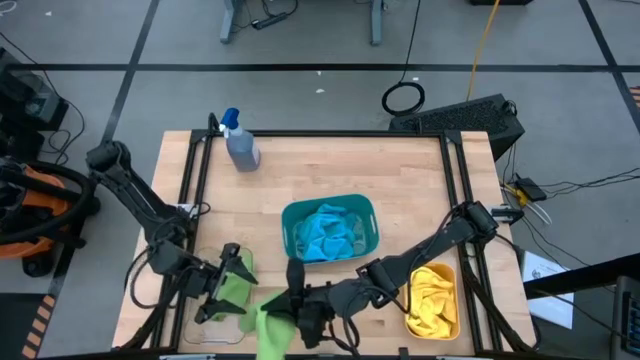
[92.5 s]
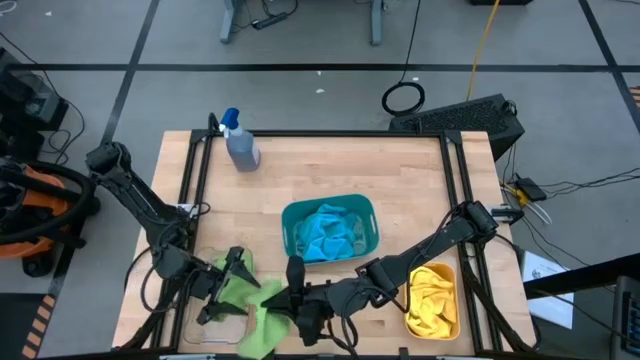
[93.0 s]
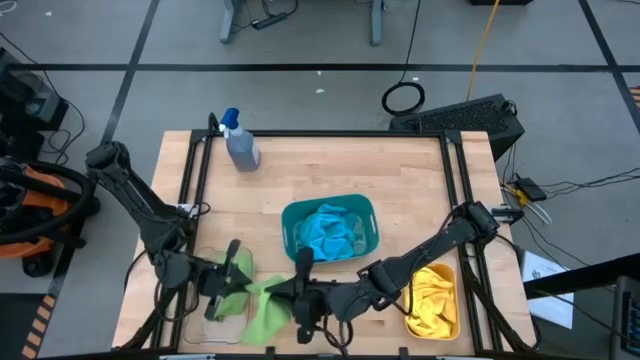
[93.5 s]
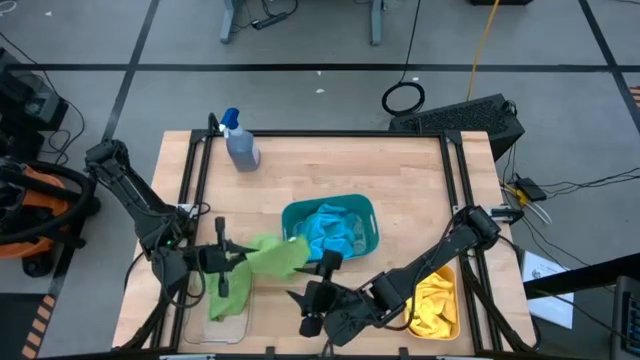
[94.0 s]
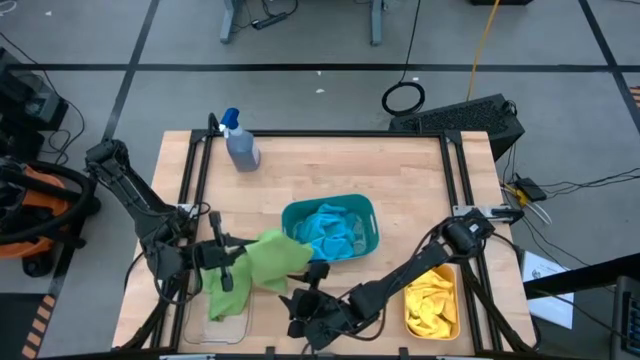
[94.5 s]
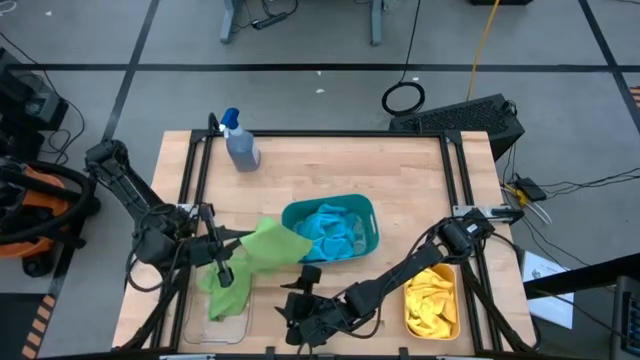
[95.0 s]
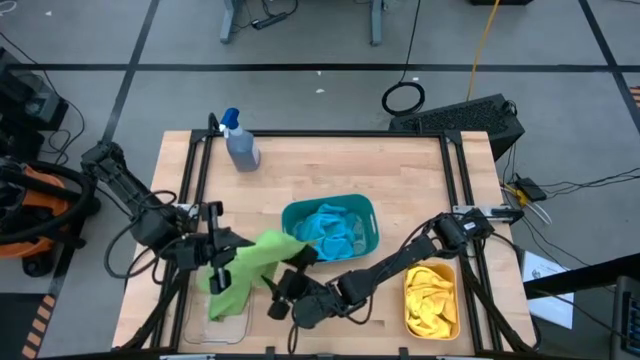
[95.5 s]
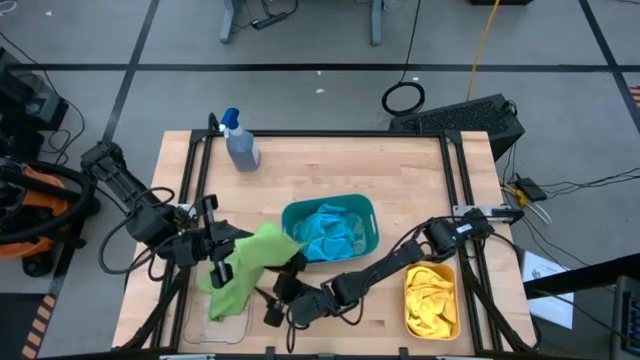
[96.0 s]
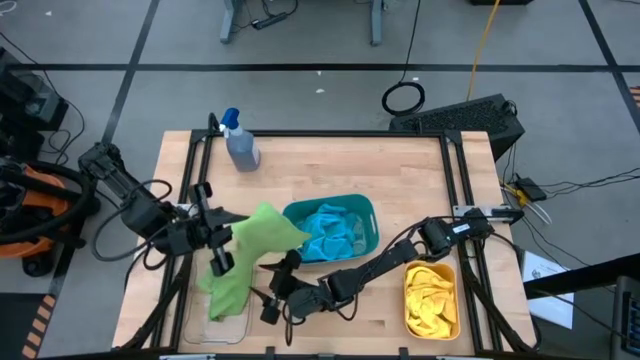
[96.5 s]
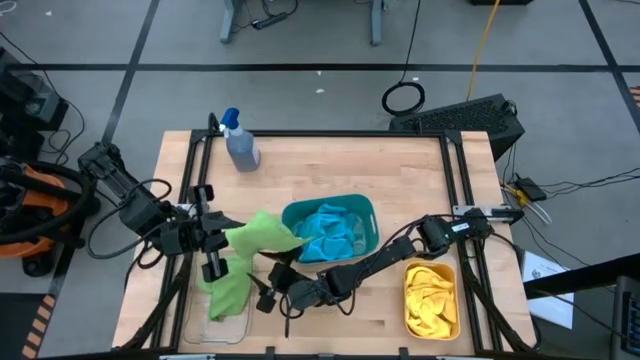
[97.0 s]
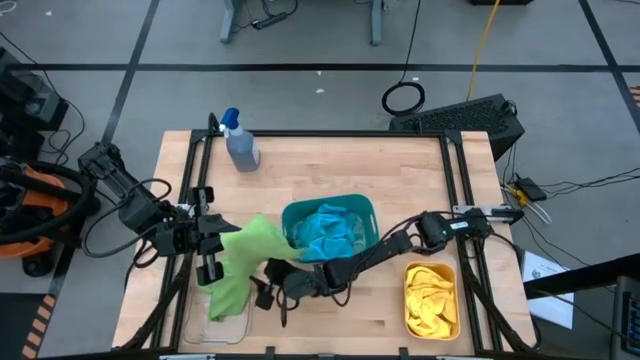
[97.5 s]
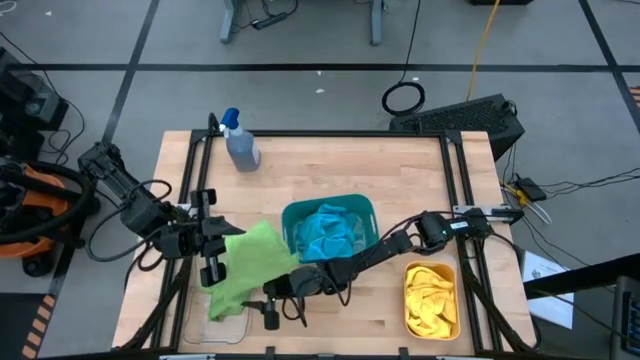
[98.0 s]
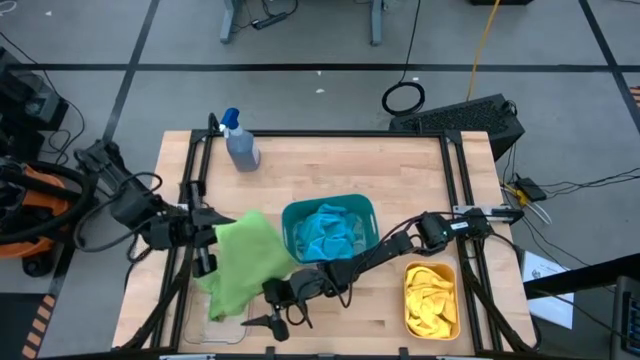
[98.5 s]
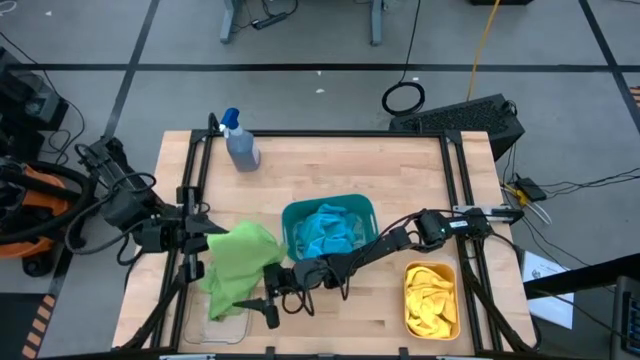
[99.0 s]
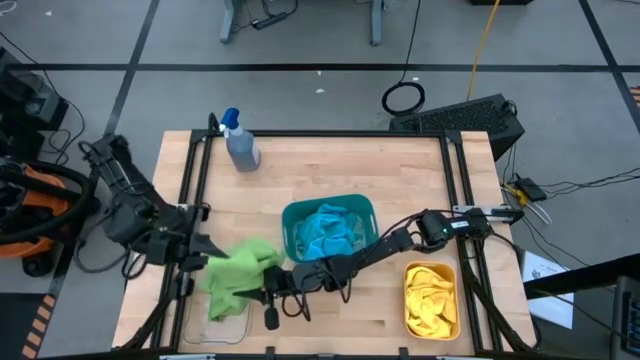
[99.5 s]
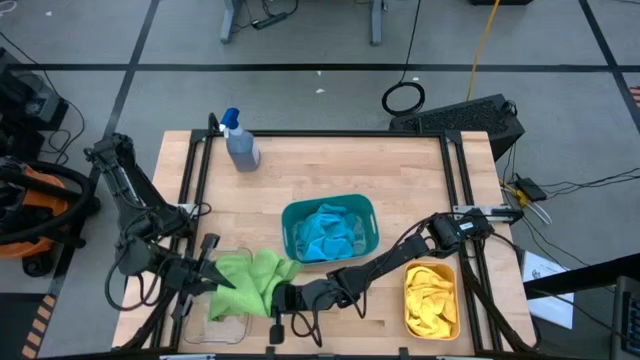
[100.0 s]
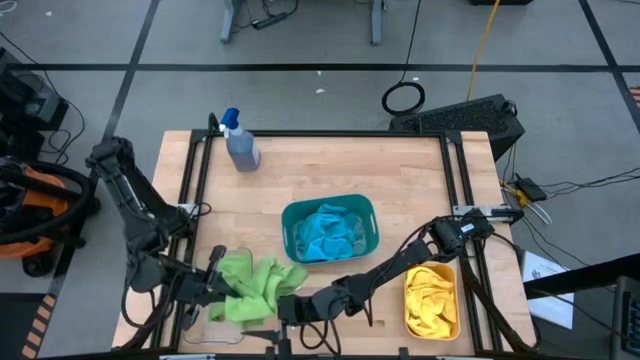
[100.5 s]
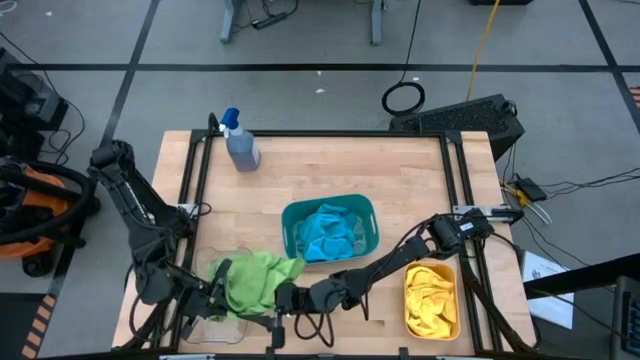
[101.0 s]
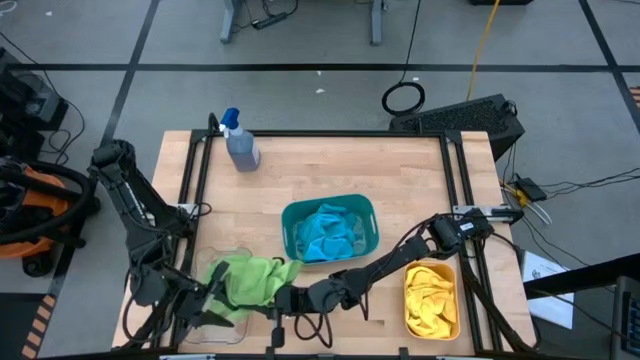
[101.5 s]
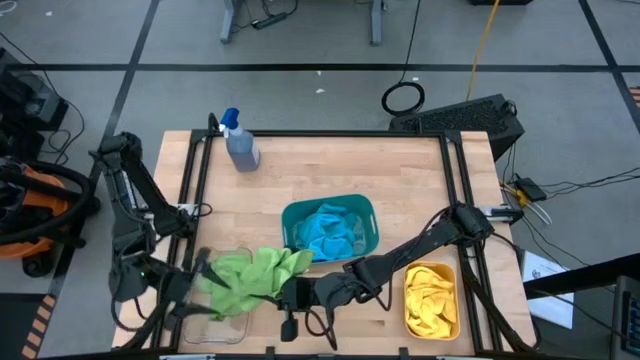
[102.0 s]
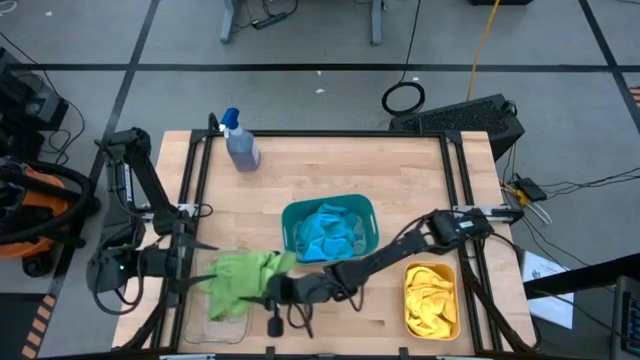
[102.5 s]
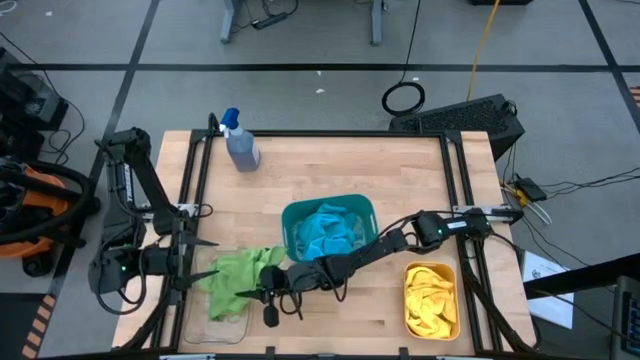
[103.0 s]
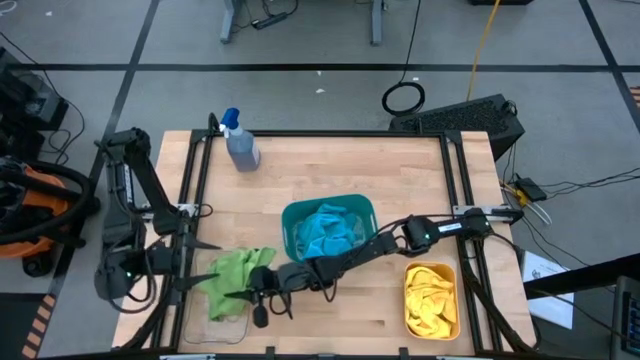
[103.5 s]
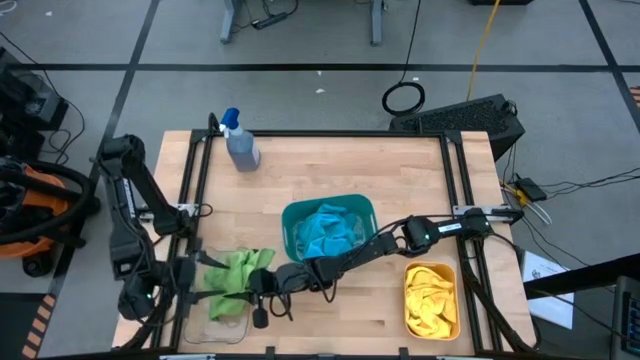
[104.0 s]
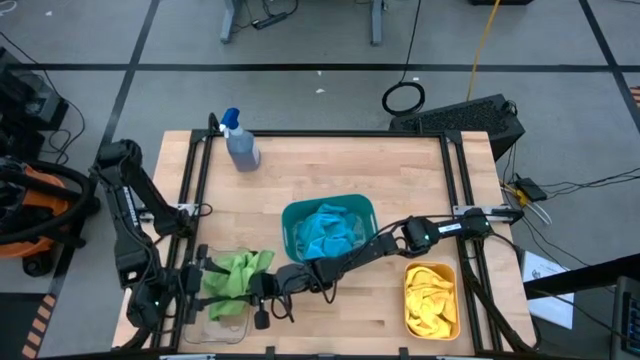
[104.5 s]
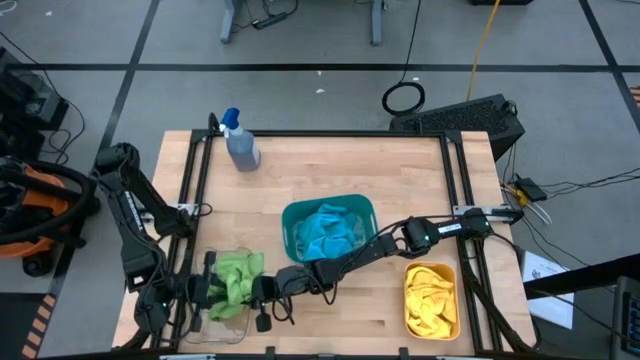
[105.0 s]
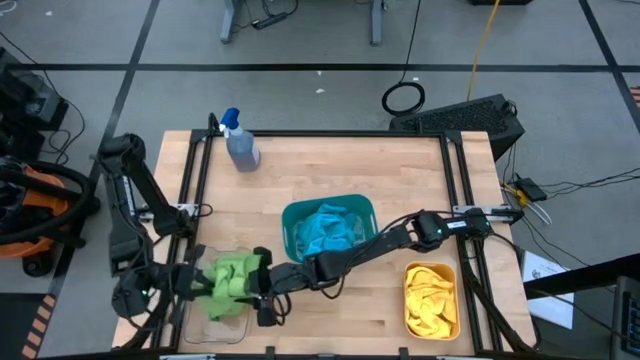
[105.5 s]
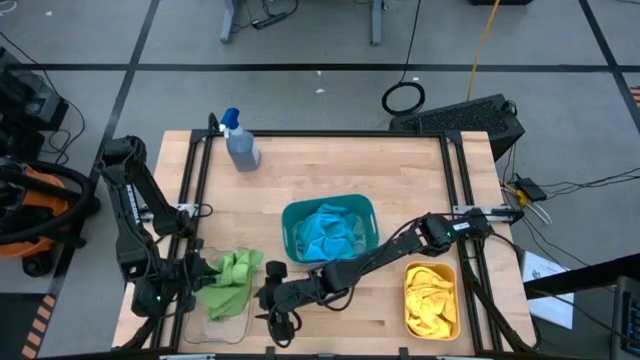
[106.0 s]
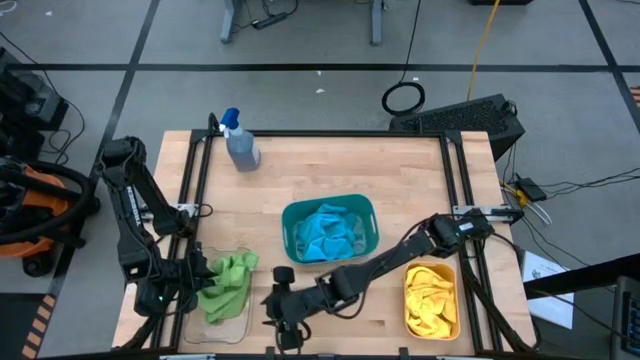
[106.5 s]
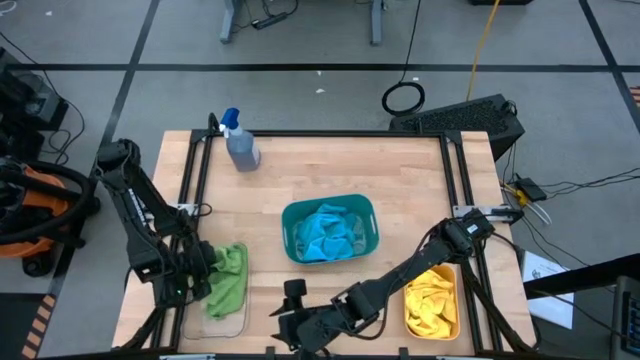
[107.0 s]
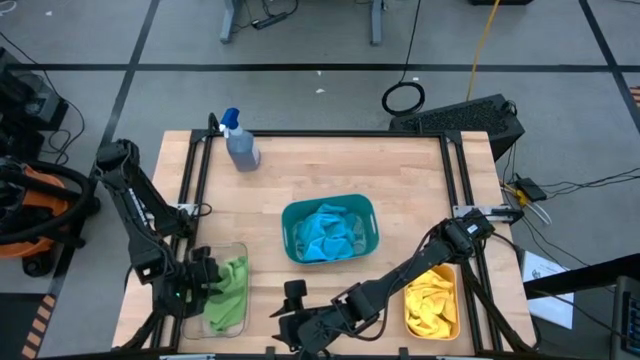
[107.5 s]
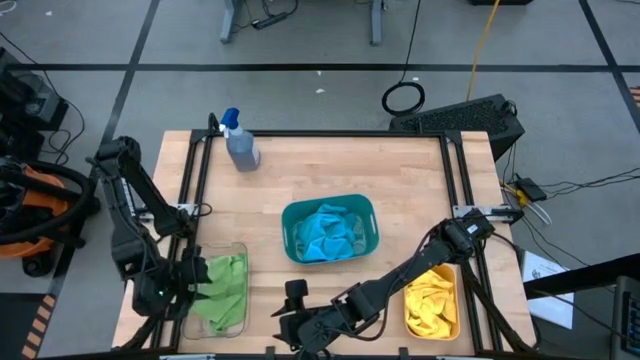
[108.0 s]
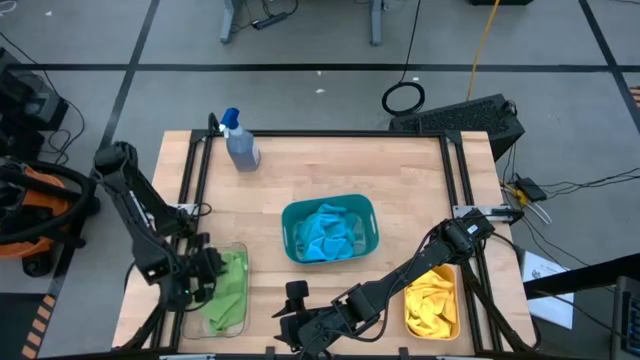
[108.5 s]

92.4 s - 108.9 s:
Task: Sort microfiber towel by color & place in baskets
Put the green microfiber towel into the transparent bin

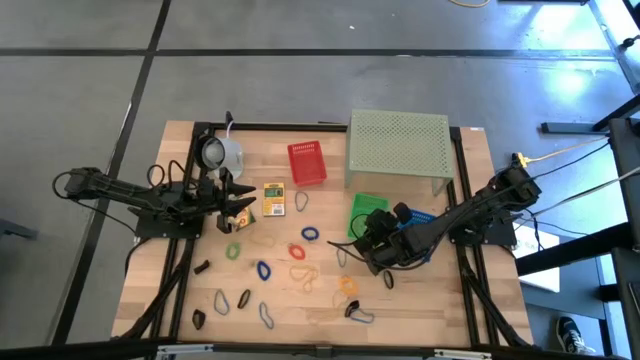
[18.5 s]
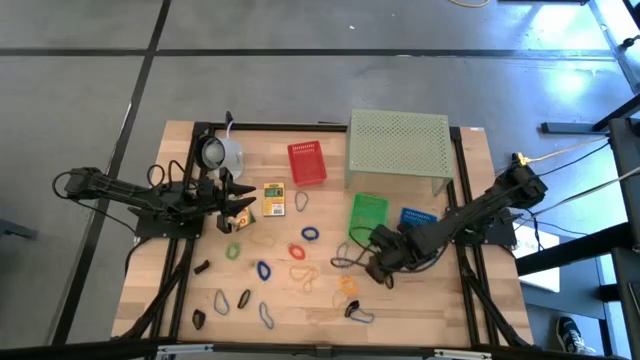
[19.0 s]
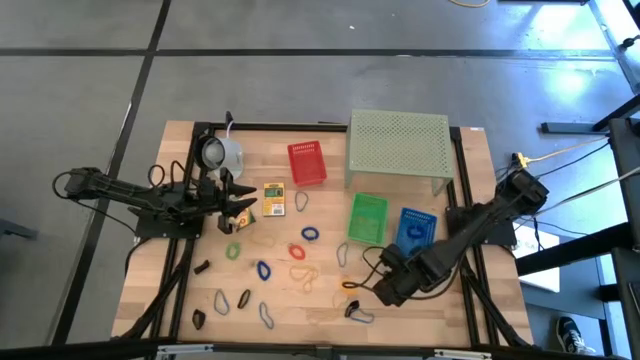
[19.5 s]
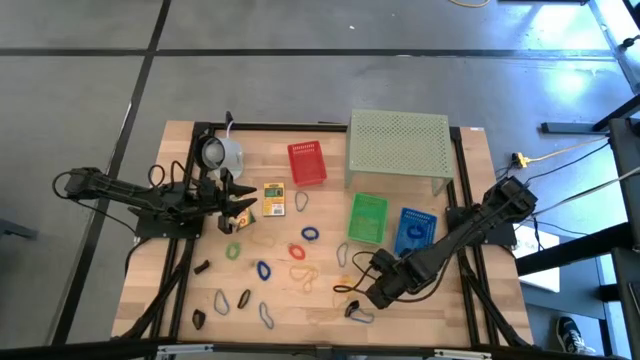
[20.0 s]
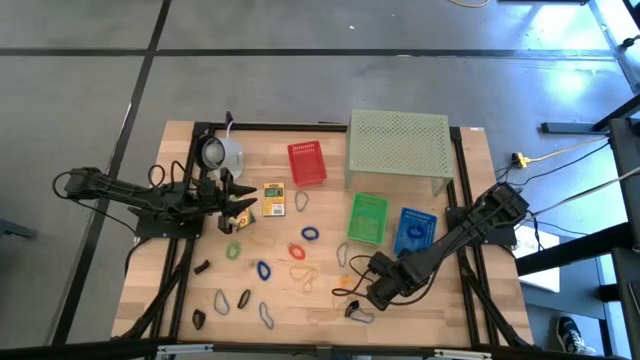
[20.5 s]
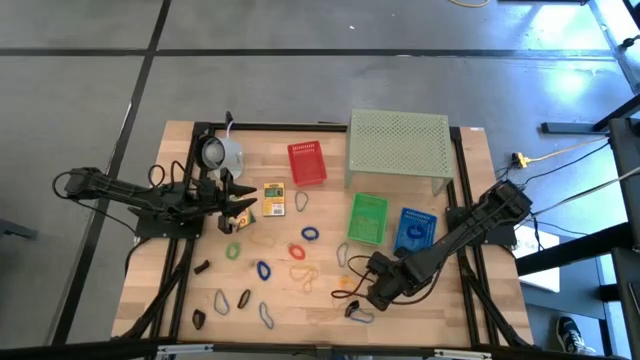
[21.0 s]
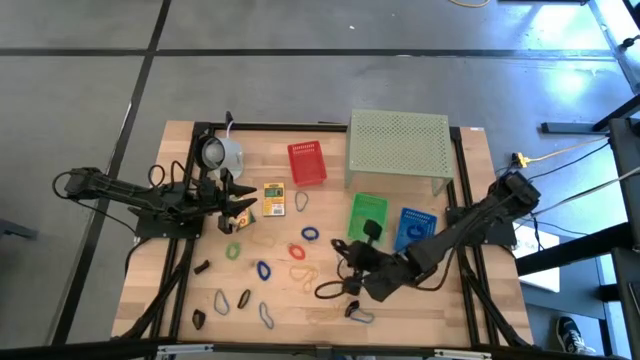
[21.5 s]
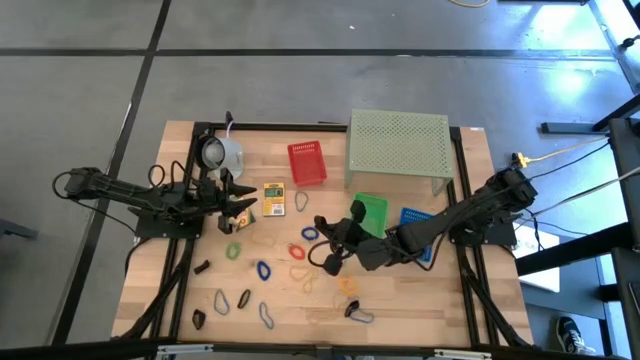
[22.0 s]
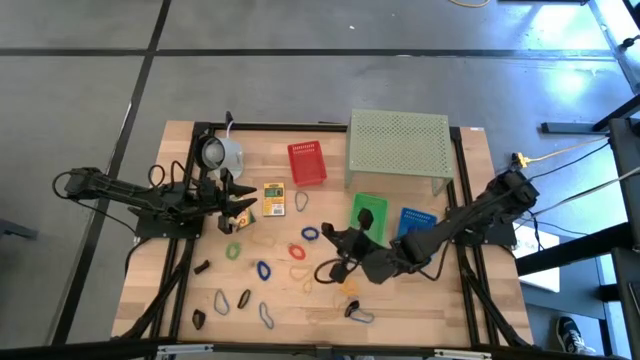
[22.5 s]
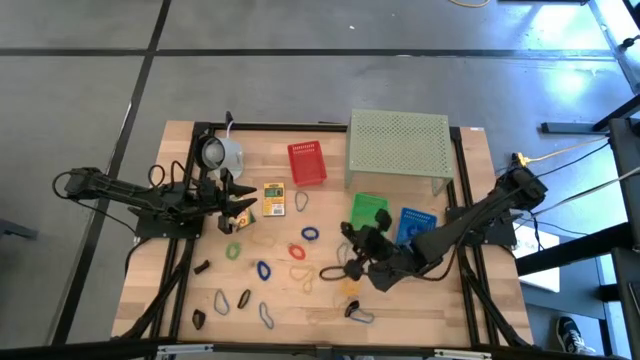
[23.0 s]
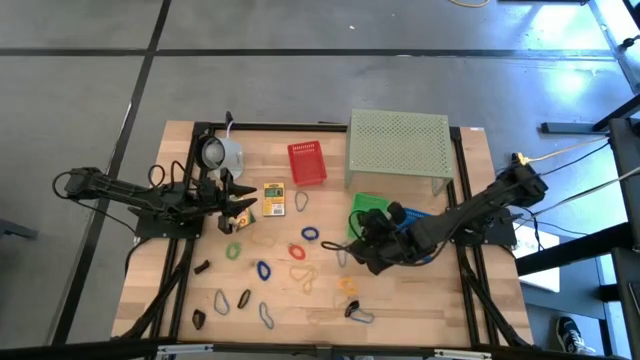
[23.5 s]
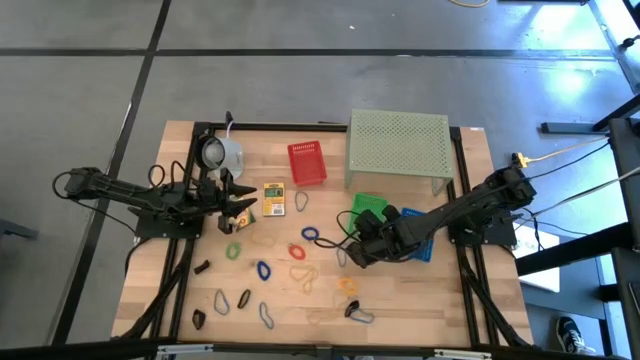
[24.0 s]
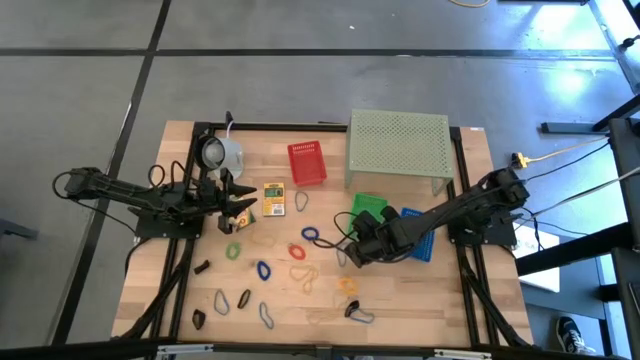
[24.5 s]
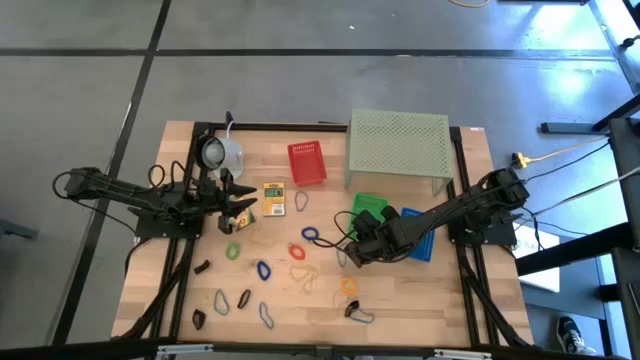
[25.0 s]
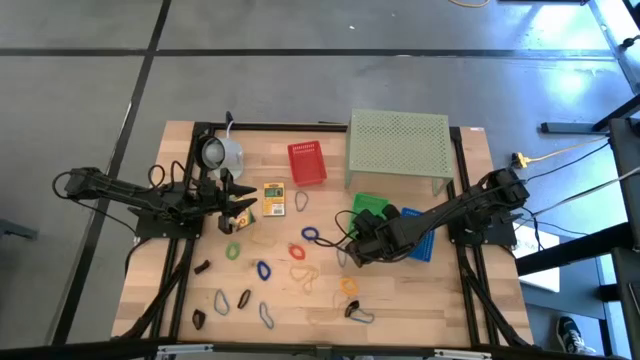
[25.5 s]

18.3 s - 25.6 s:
Task: Pick & Place Office Desk Supplies
Put the black rubber band into the green bin
